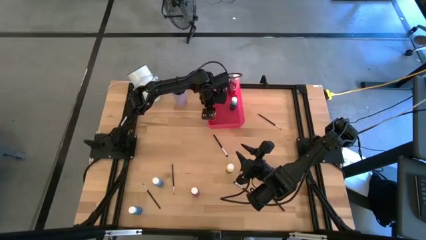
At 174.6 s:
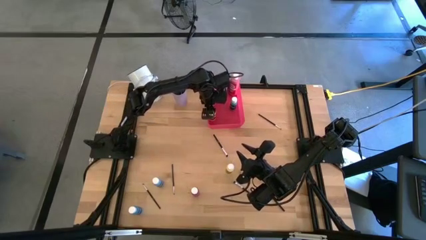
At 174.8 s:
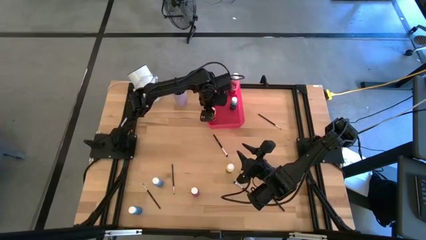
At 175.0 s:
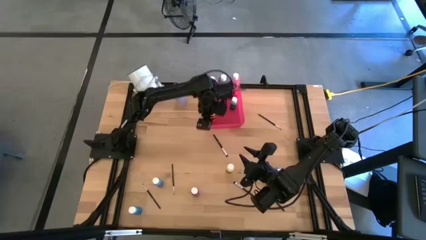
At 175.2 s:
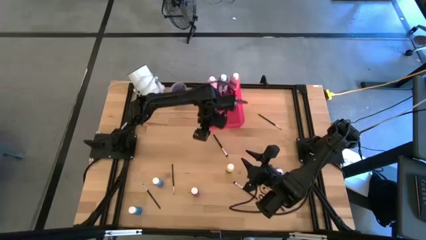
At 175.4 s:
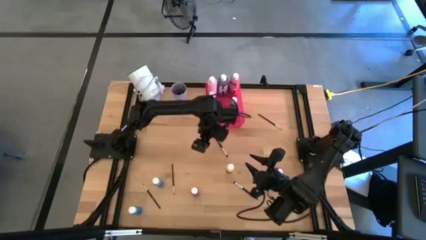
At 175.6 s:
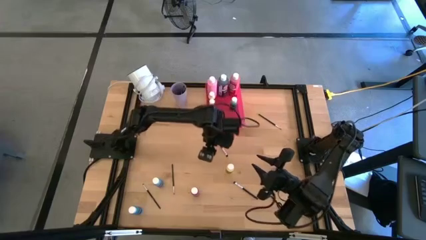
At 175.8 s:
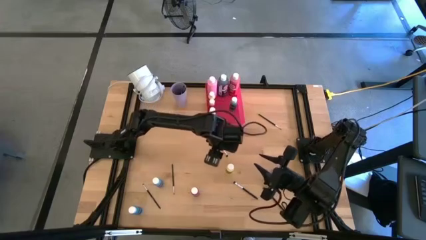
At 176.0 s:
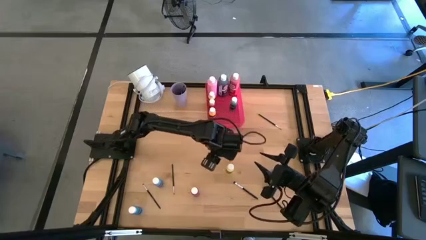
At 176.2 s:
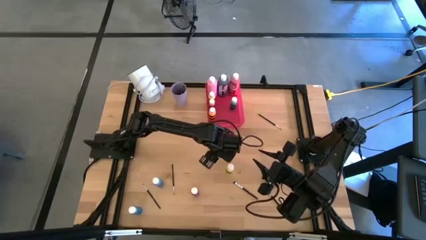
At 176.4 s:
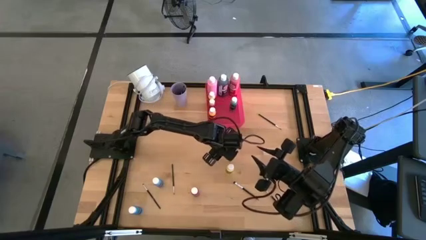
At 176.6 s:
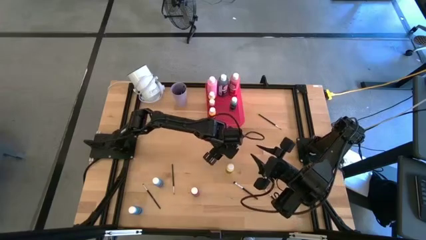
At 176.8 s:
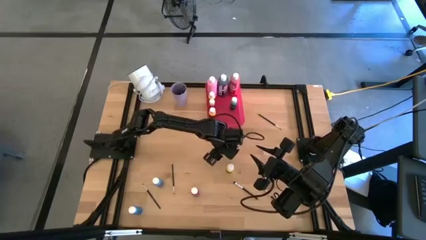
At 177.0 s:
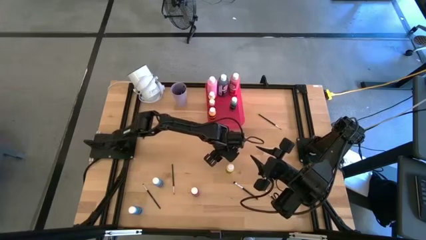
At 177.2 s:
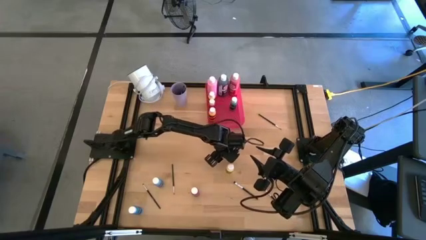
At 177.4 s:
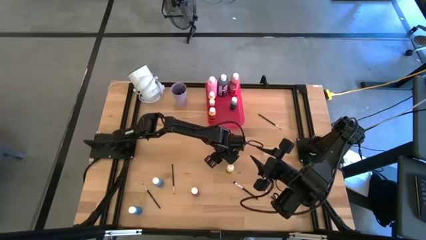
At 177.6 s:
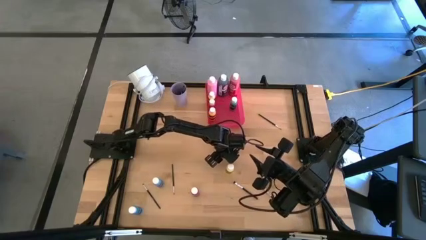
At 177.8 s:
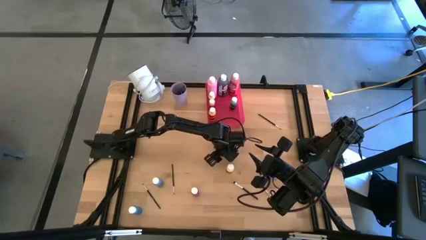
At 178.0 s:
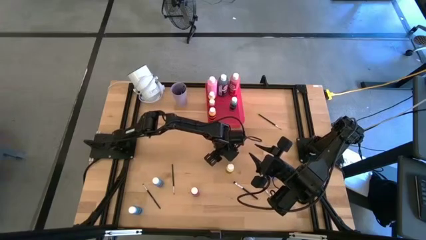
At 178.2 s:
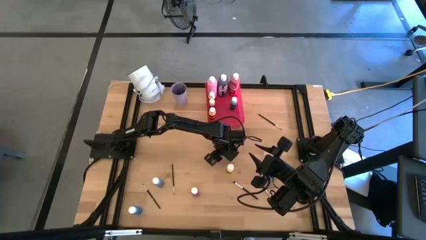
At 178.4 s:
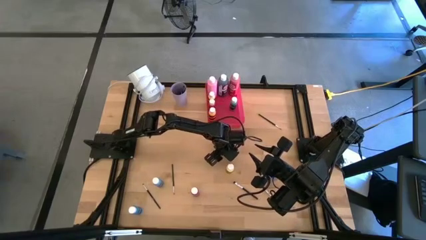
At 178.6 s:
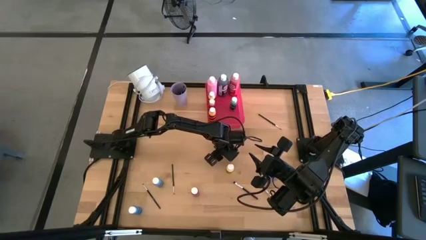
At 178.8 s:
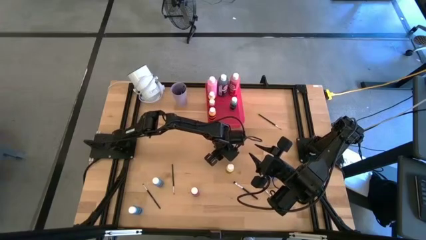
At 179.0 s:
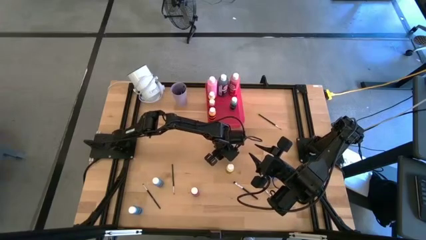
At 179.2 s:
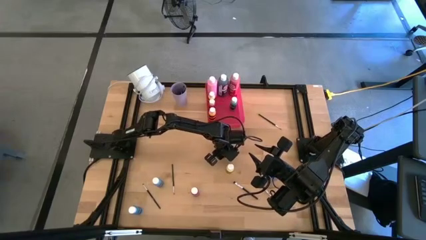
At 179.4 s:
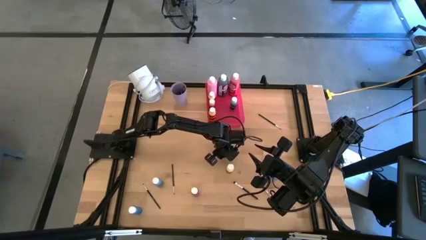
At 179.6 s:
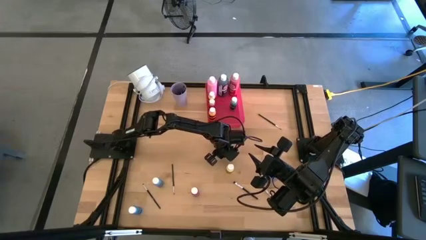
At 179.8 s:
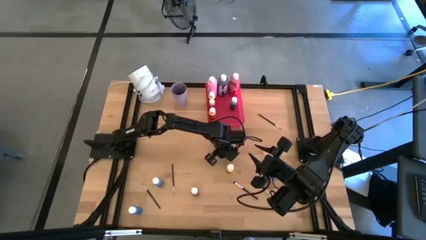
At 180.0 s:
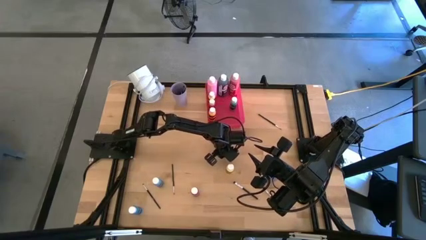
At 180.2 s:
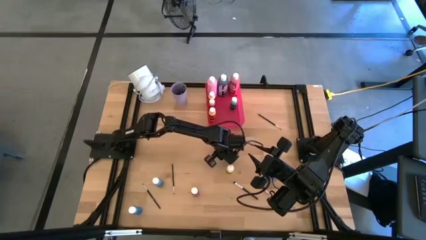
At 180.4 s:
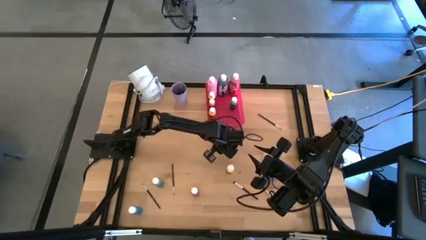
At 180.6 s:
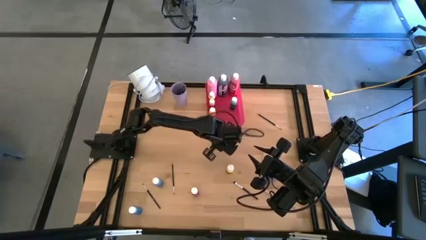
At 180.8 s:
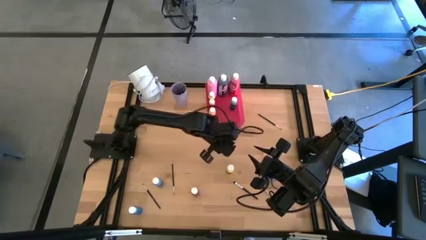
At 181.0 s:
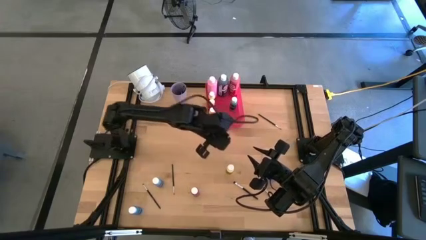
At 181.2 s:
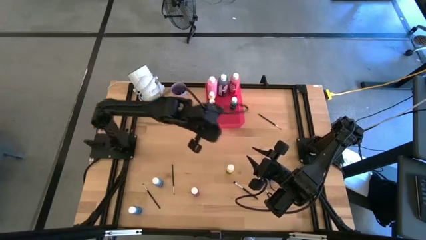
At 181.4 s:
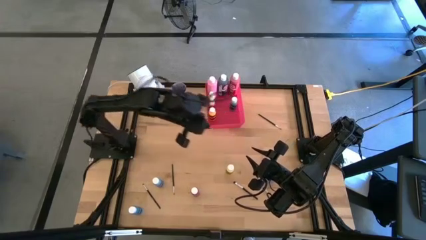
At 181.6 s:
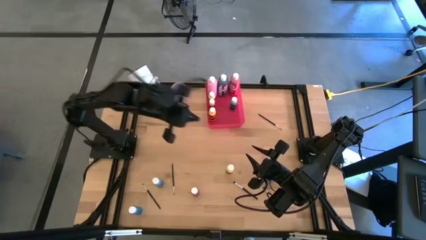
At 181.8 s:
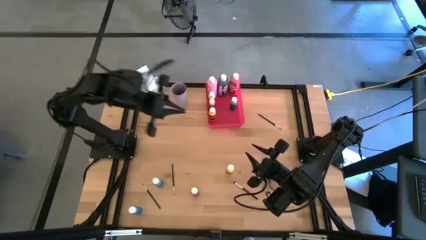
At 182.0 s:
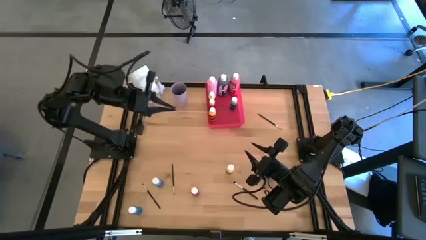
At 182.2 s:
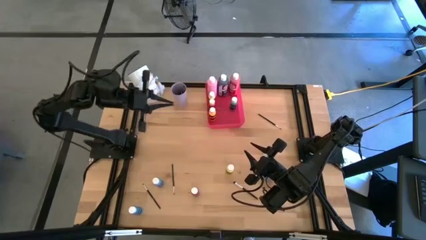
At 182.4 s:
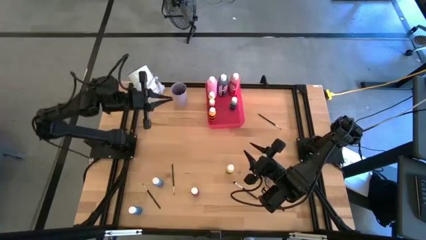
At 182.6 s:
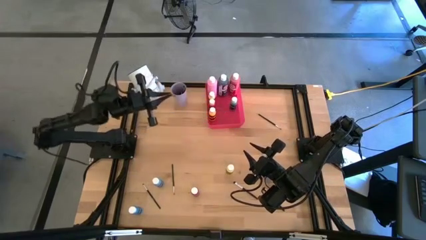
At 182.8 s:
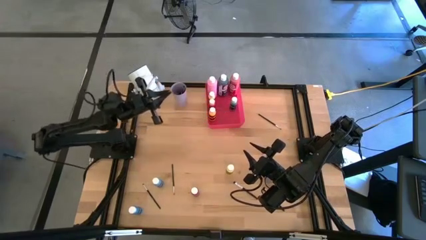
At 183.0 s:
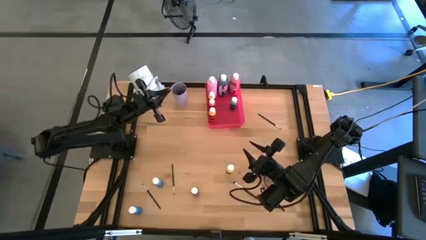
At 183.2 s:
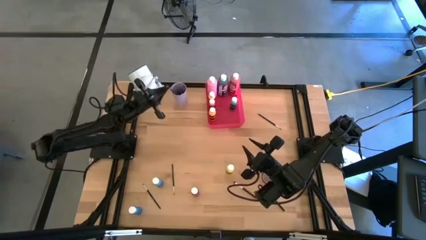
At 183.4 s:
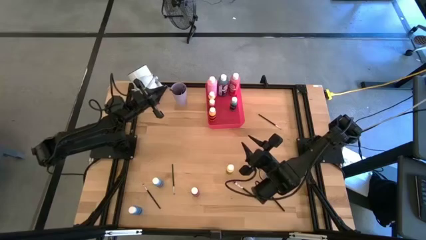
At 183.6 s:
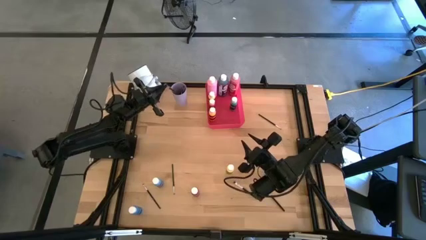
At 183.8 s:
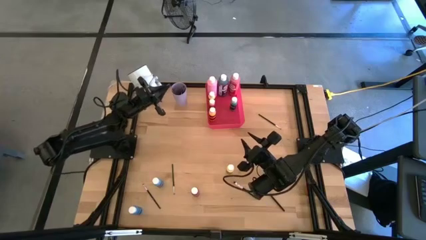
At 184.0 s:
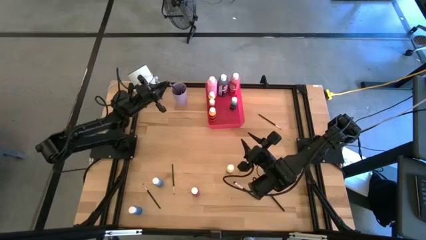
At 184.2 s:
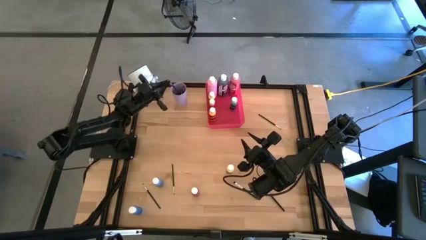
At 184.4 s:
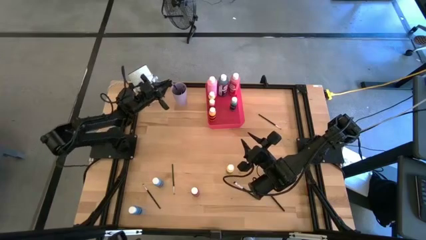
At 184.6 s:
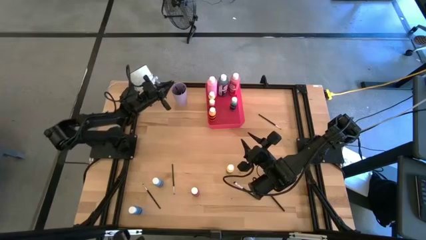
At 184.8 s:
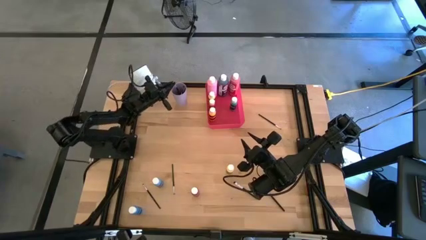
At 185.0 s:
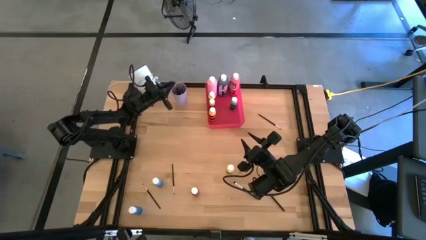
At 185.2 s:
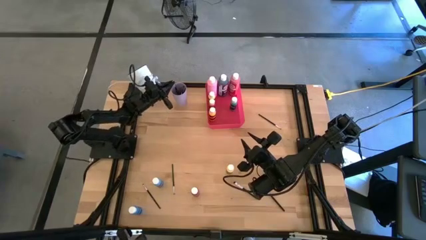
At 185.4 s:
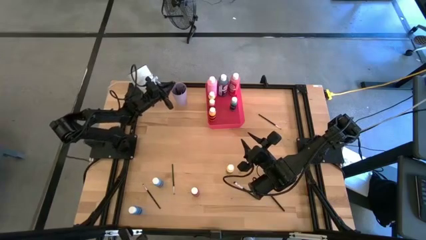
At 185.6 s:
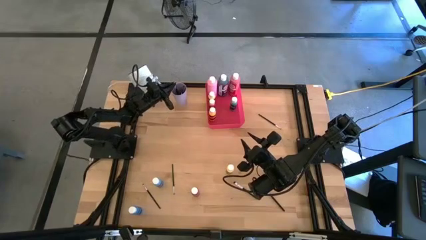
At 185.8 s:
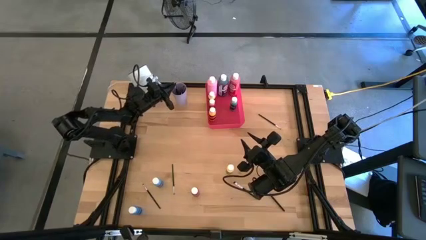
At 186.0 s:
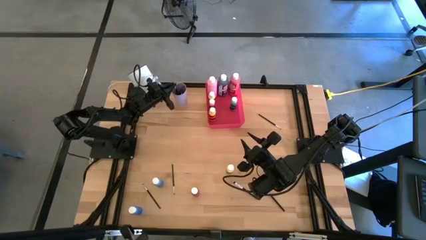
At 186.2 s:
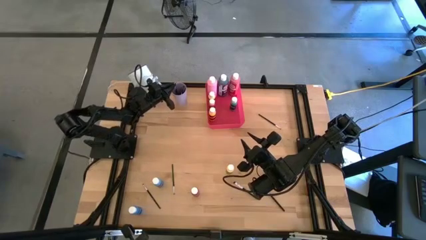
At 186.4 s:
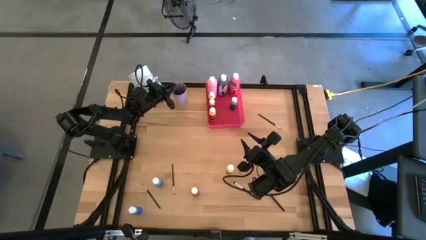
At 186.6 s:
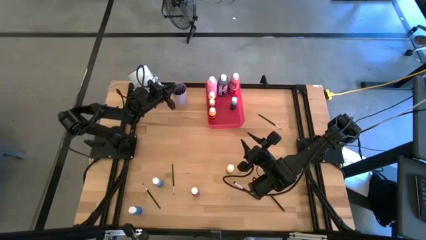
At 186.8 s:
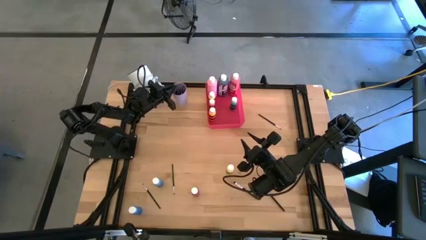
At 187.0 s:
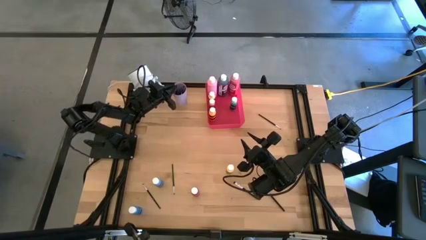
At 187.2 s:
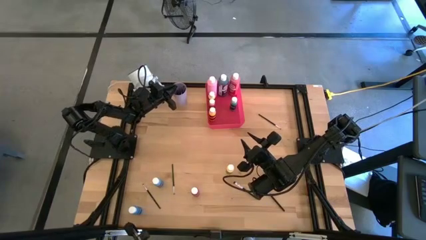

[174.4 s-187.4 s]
Task: Pick & Place Paint Supplies
Put the black paint brush into the purple cup

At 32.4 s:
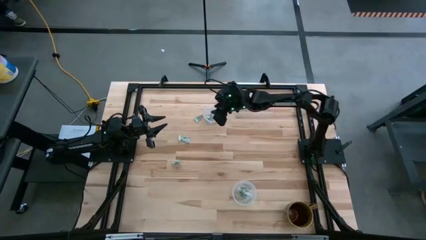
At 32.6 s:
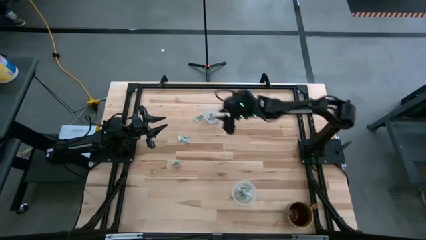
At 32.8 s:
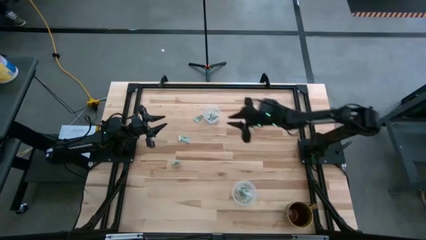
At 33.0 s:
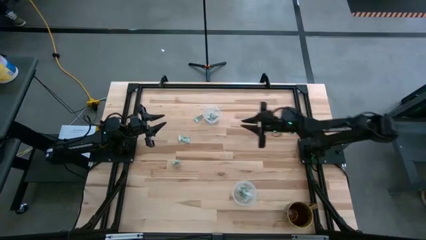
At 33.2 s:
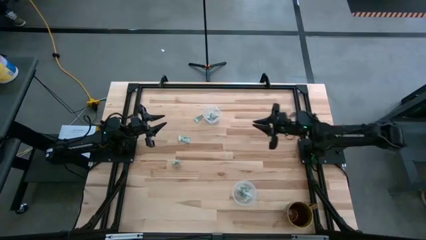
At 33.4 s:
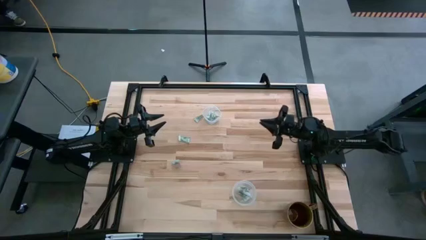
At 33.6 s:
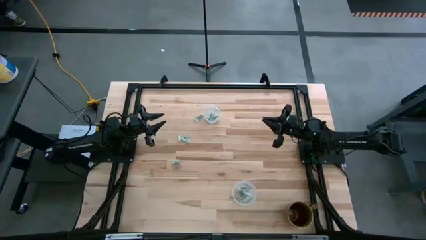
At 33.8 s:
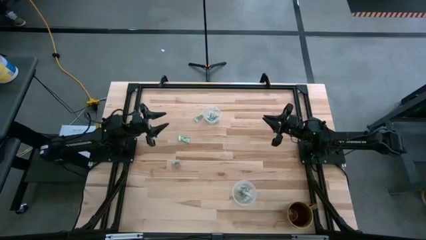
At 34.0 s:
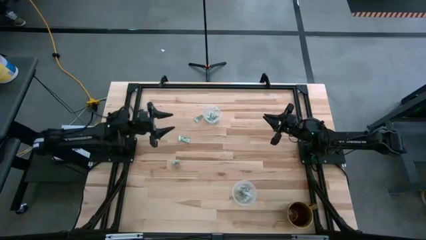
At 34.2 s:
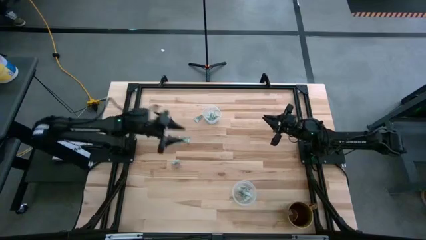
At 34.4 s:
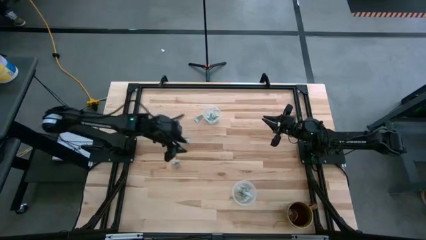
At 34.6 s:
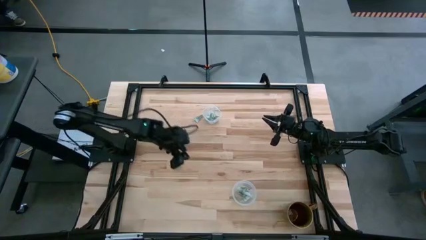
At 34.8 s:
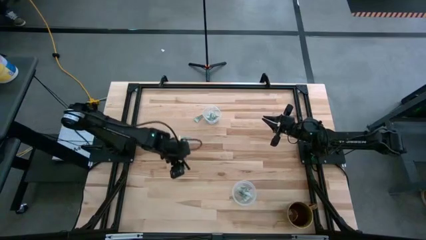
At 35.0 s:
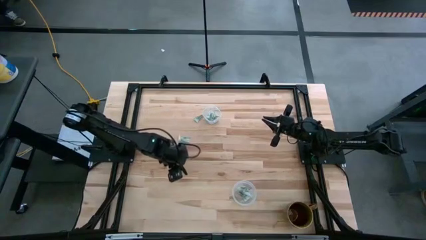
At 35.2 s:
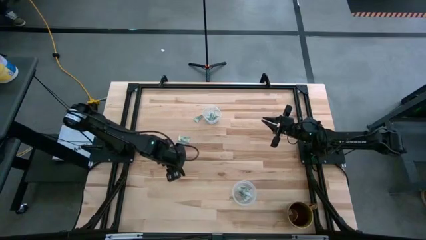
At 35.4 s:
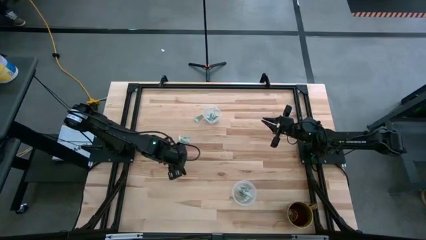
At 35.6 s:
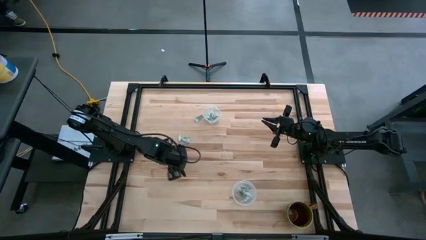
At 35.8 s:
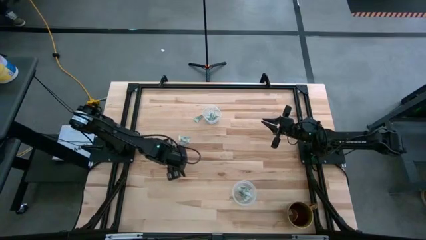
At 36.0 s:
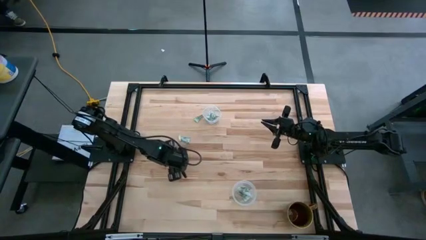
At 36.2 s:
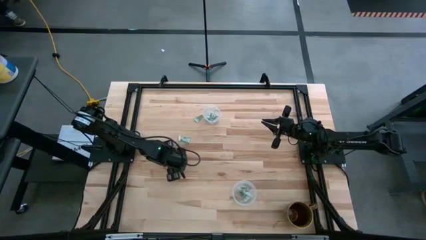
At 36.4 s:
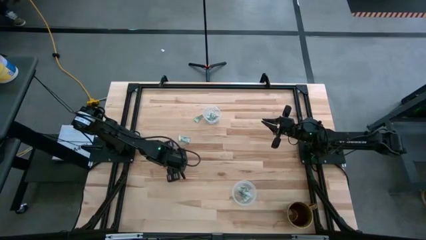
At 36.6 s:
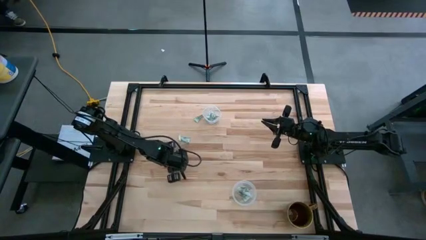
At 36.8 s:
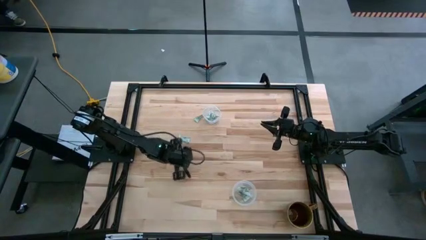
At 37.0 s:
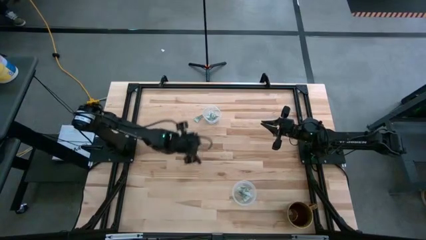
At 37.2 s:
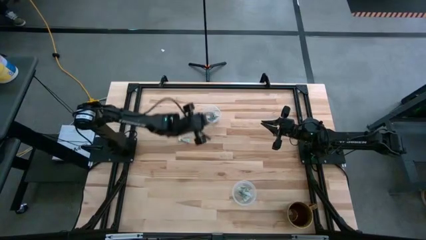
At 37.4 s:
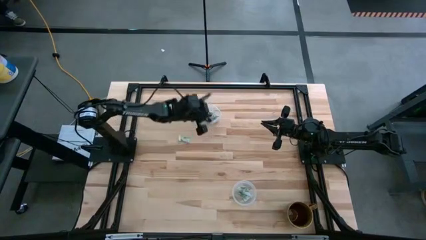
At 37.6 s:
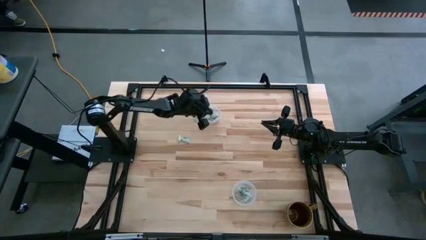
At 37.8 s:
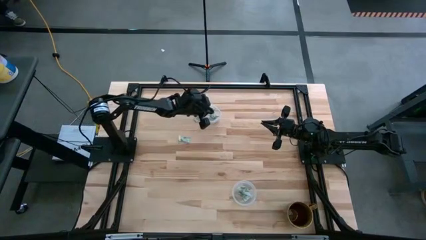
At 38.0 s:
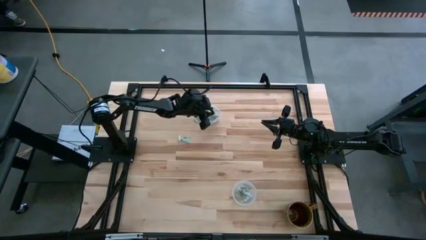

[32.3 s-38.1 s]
Task: Pick and place Stevia / Truvia into bins
Put the bottom stevia packet into the top transparent container
